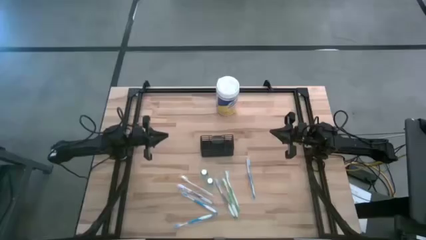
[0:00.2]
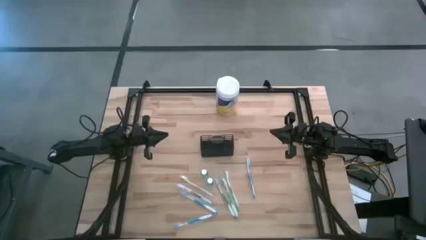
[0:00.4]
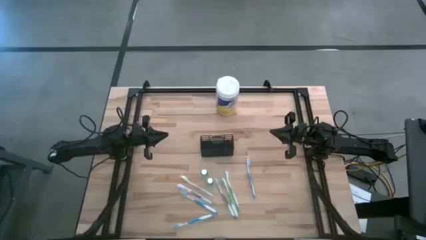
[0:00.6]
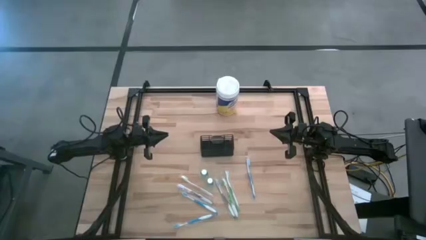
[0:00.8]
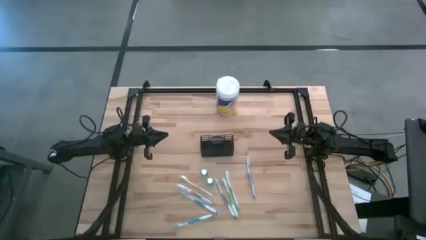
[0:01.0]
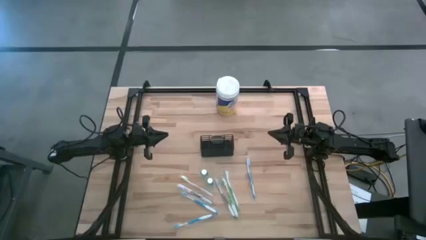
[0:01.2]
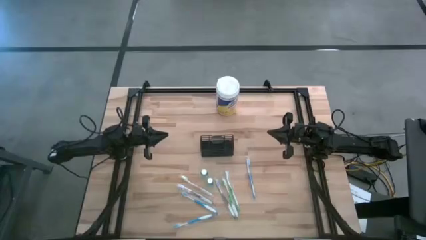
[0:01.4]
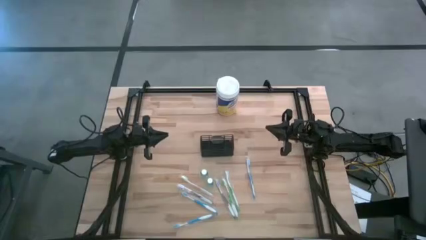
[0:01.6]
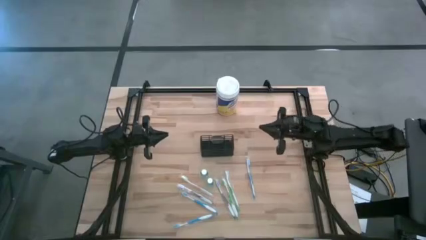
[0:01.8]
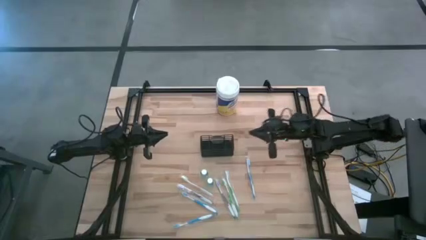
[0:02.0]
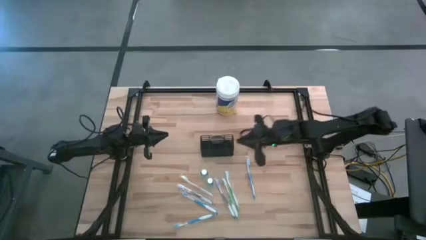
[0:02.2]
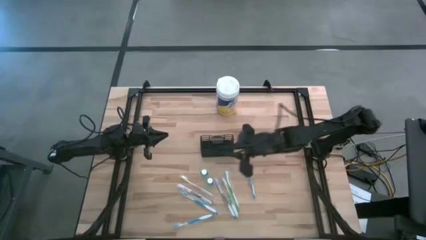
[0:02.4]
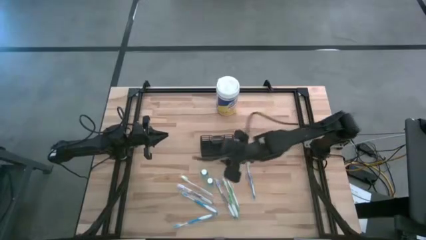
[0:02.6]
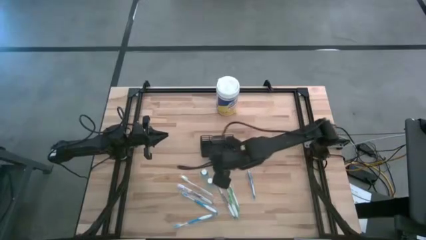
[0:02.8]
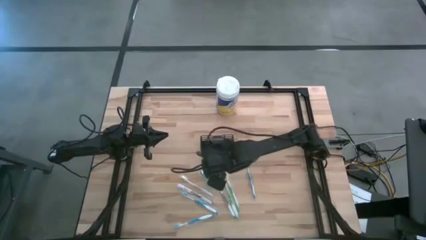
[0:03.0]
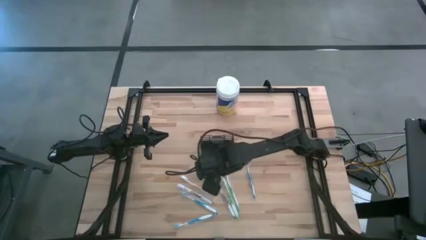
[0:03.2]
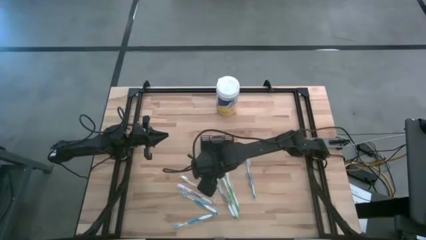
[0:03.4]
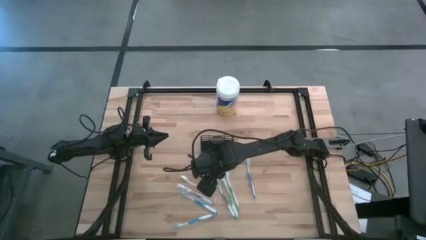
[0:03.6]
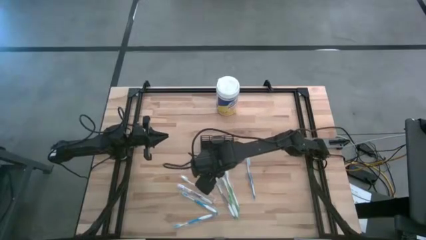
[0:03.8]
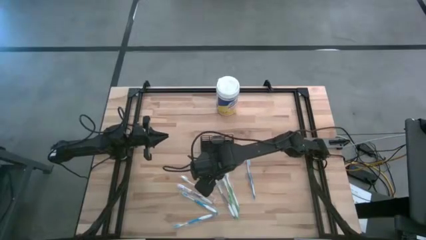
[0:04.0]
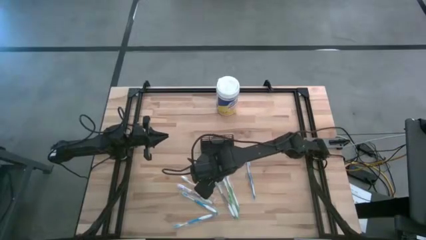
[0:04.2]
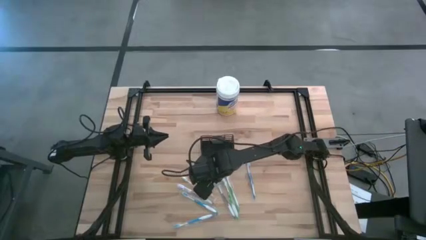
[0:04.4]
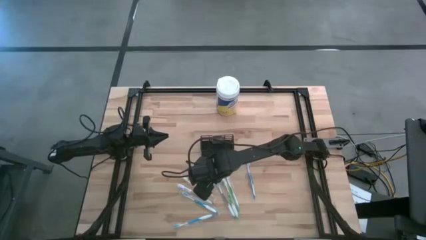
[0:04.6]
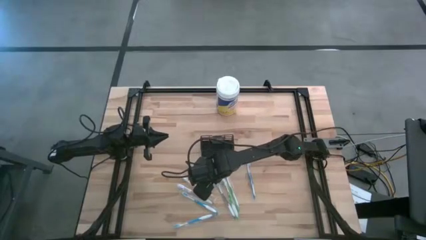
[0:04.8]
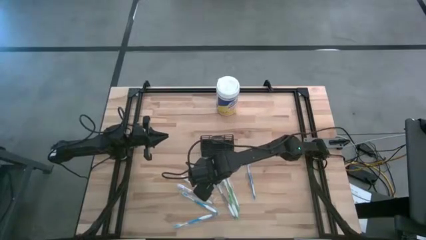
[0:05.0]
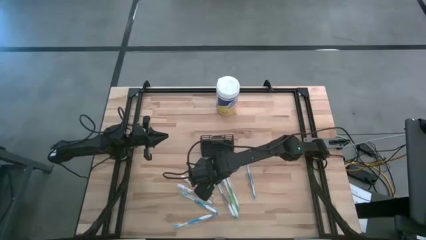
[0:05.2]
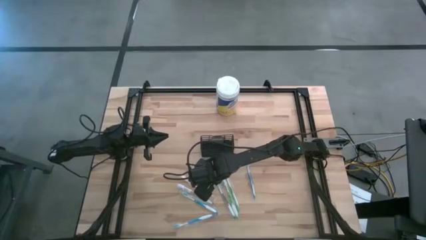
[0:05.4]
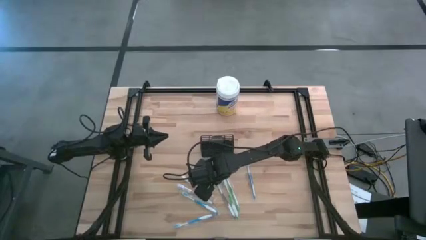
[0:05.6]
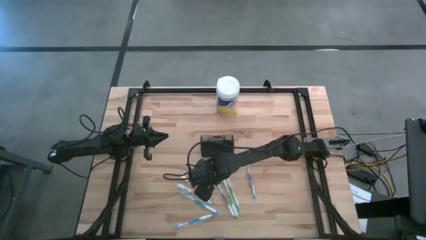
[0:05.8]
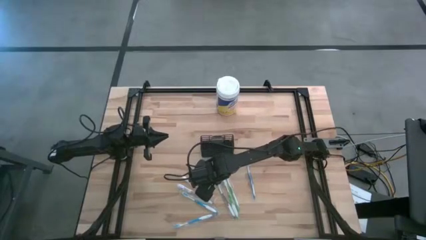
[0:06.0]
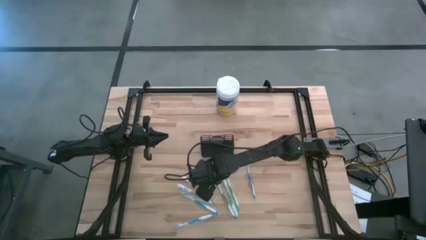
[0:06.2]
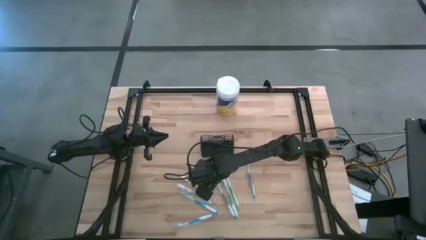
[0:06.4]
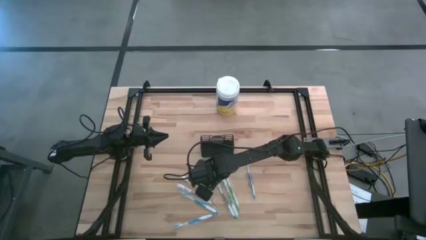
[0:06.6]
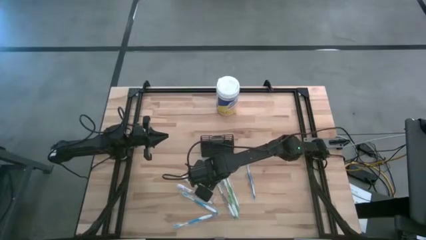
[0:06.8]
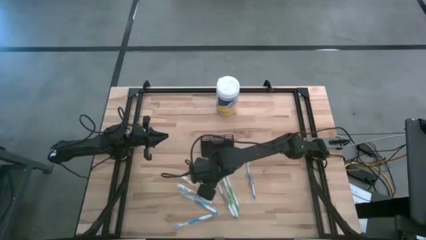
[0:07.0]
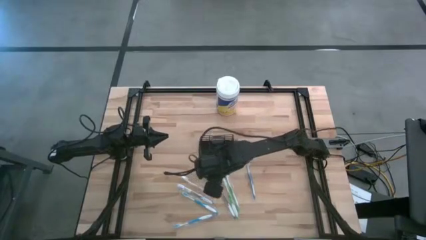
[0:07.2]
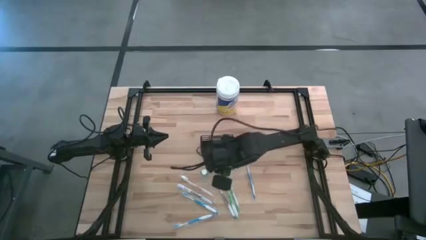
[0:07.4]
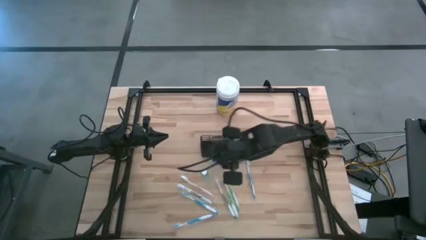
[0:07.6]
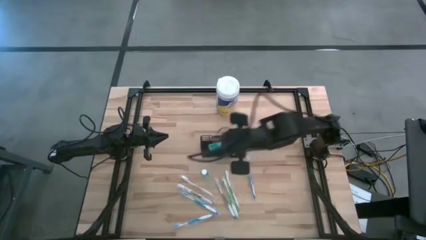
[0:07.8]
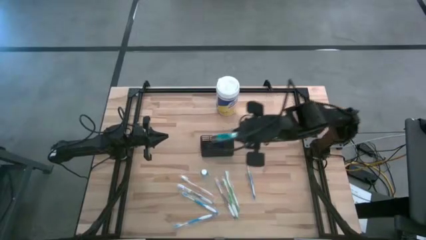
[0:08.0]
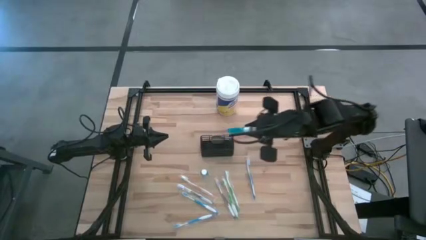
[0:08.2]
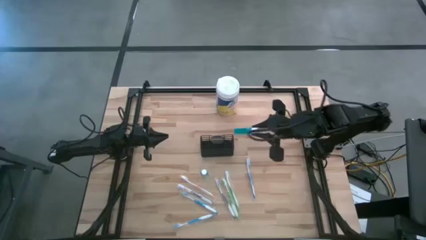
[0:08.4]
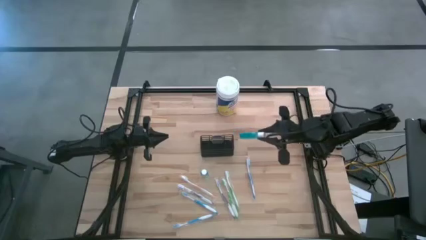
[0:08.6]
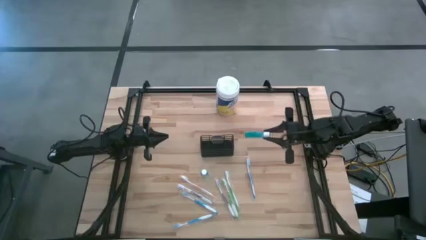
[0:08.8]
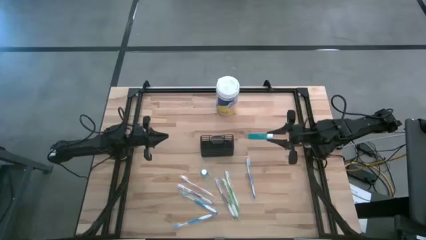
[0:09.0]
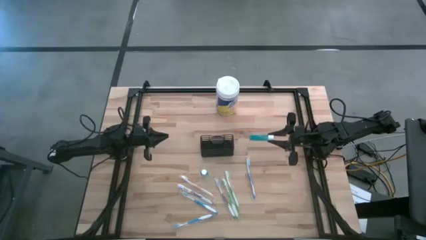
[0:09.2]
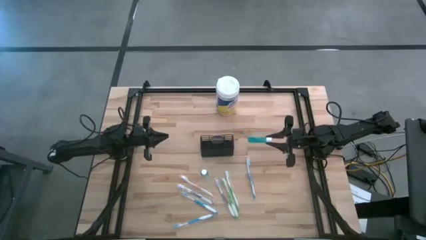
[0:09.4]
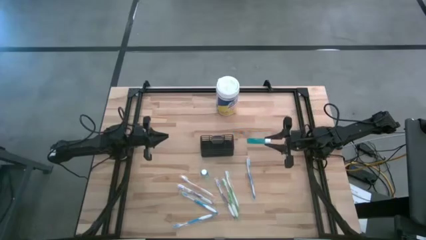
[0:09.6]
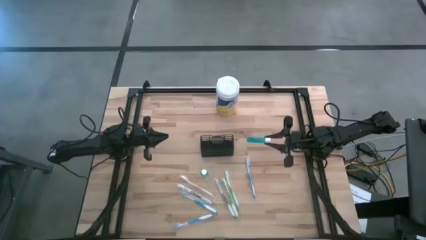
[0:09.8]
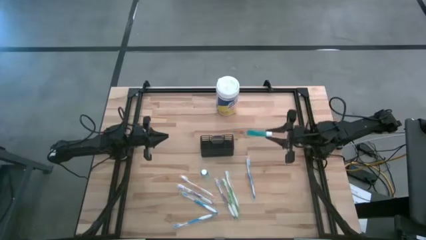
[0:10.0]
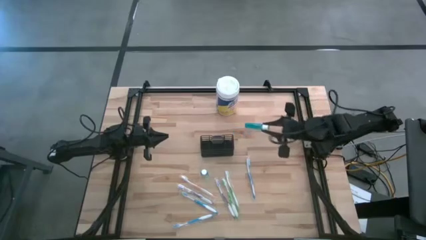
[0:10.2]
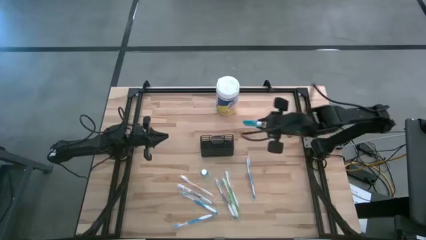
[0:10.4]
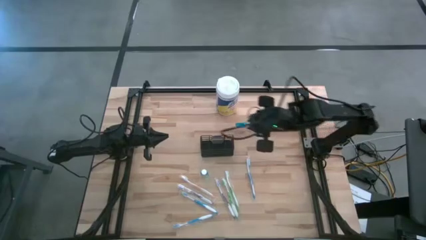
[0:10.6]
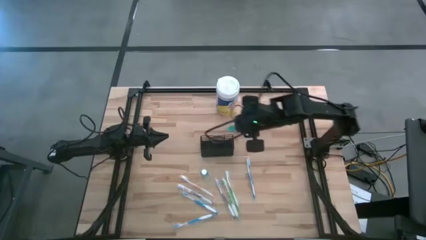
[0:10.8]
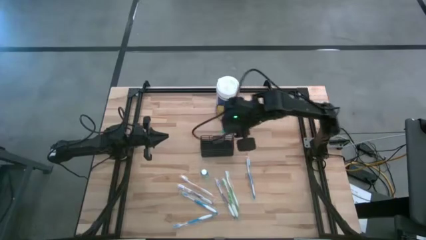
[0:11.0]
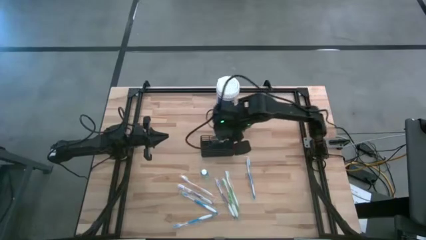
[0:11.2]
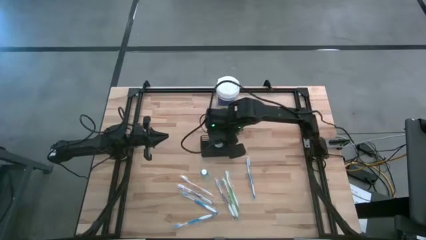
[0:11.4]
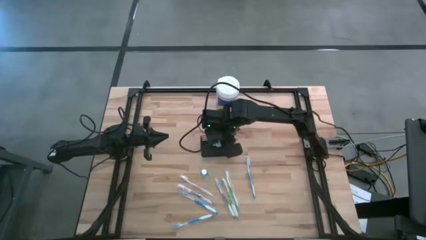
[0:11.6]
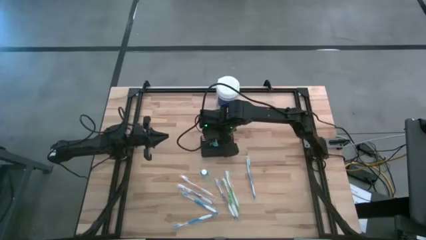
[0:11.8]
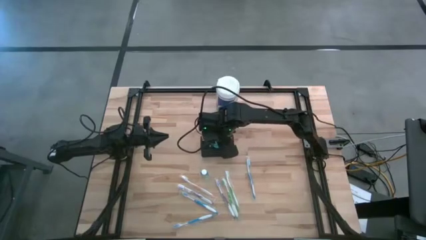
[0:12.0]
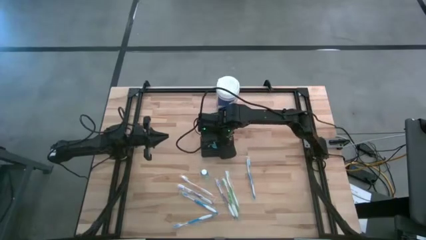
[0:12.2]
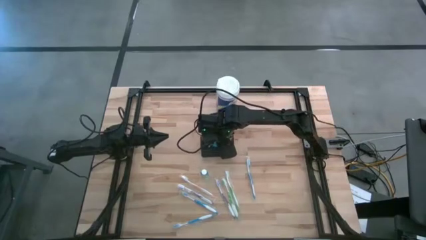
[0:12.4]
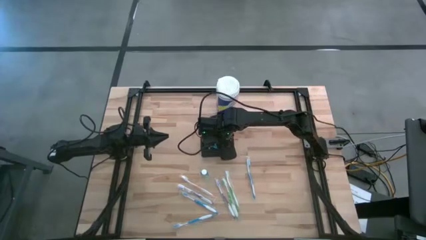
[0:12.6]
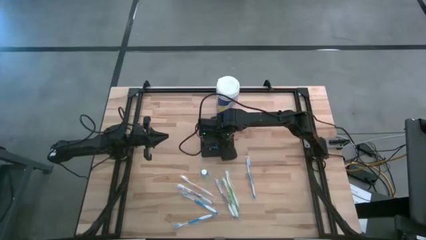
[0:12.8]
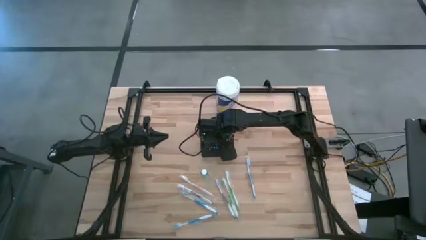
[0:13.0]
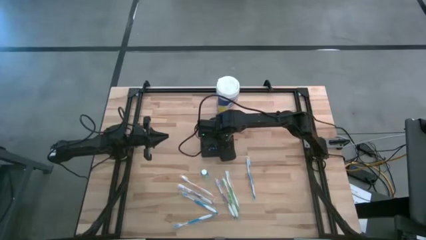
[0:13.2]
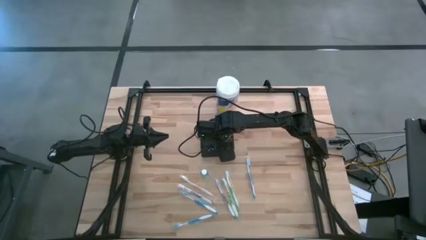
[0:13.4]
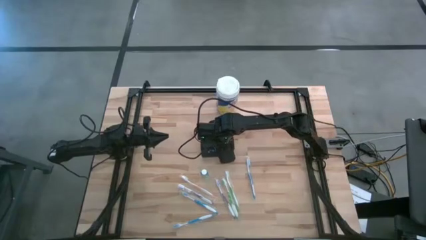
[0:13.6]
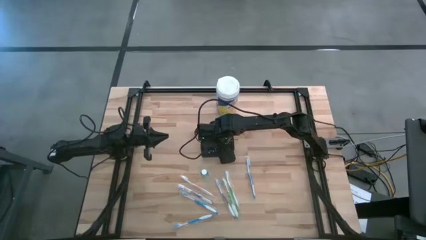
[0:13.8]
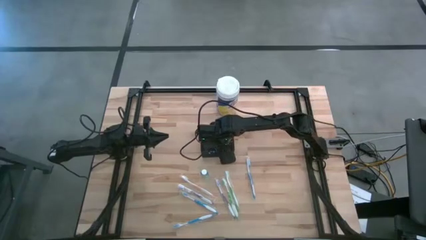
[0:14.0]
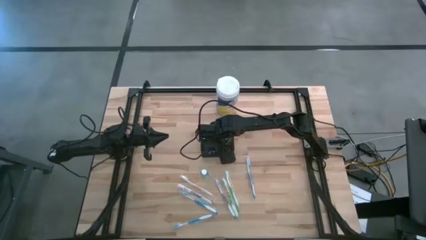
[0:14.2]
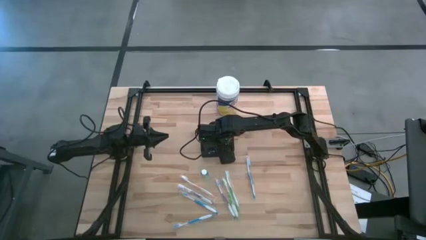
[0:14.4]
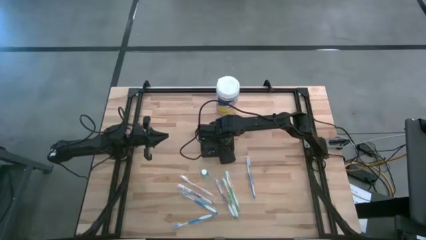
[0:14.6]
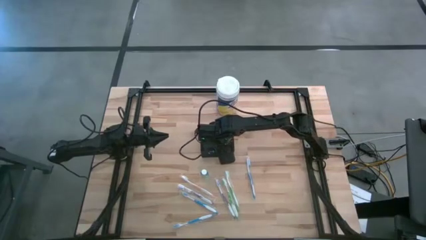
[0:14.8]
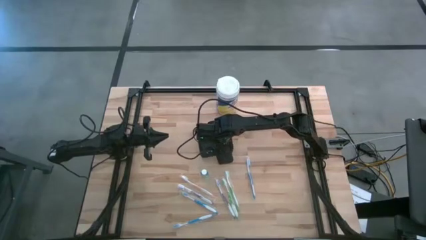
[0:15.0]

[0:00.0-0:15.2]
Task: Pick & Place toothbrushing station
Put the bottom blue mouthwash into the black wire organizer
